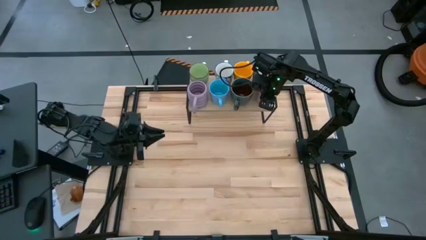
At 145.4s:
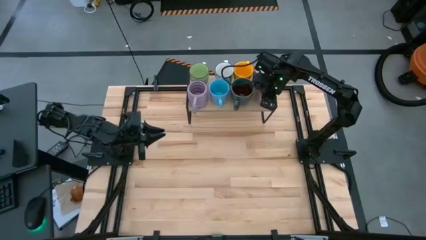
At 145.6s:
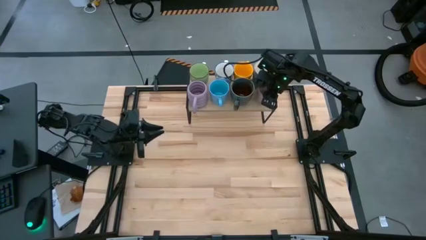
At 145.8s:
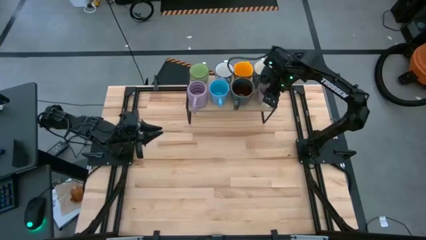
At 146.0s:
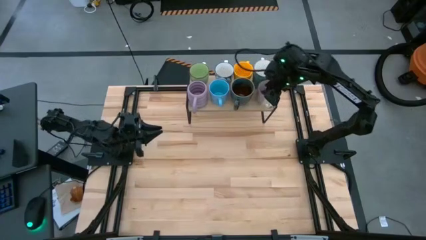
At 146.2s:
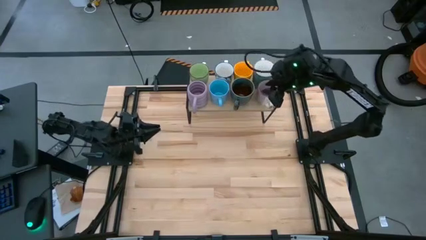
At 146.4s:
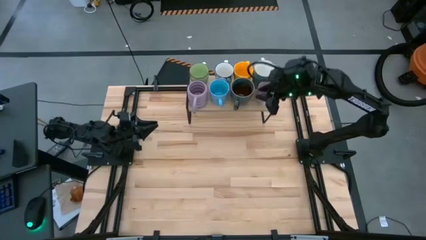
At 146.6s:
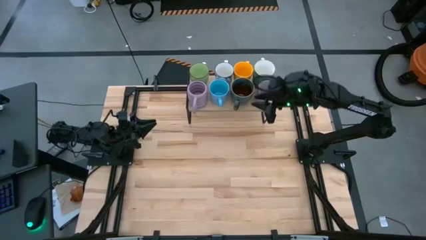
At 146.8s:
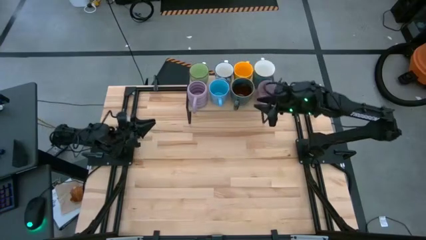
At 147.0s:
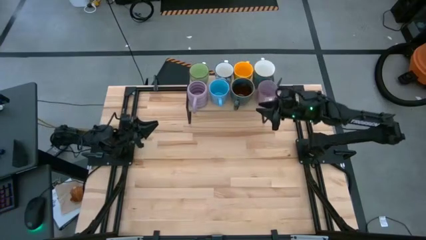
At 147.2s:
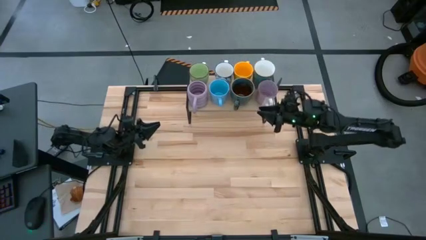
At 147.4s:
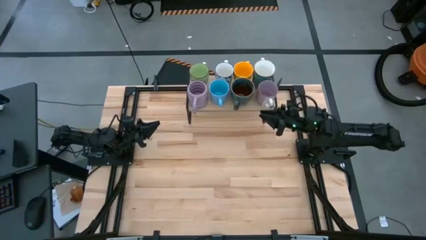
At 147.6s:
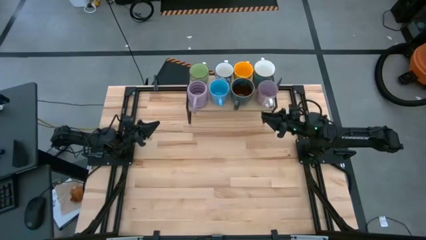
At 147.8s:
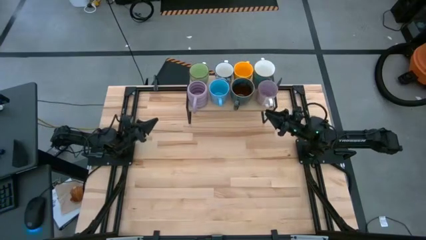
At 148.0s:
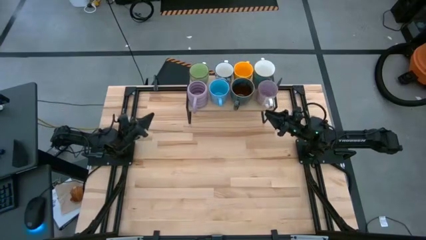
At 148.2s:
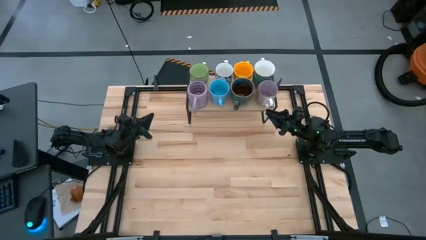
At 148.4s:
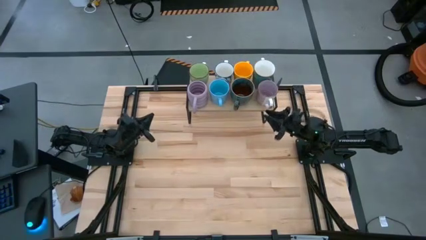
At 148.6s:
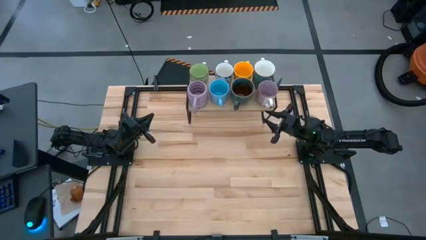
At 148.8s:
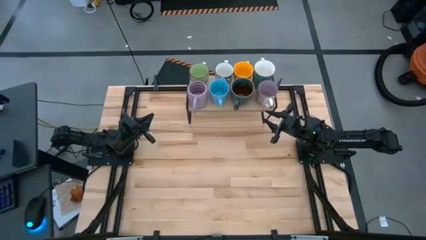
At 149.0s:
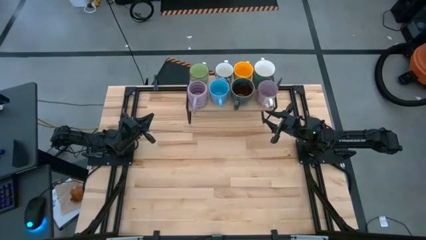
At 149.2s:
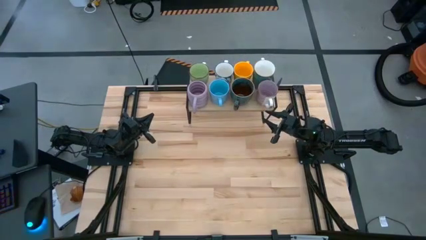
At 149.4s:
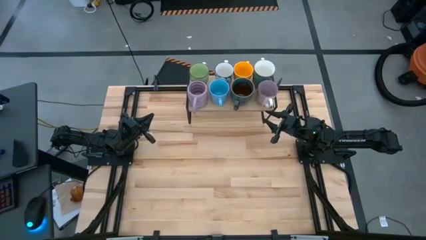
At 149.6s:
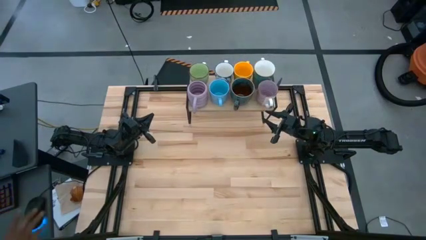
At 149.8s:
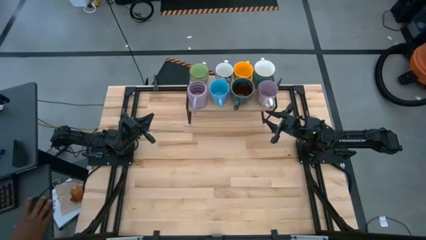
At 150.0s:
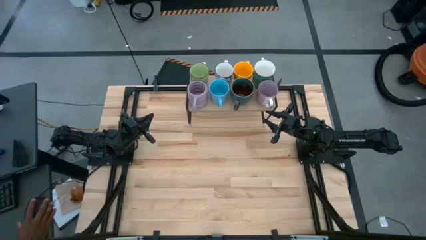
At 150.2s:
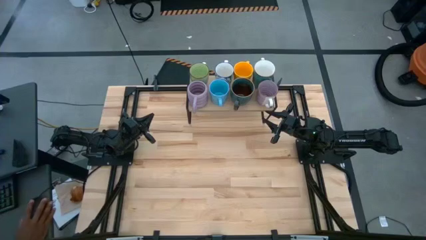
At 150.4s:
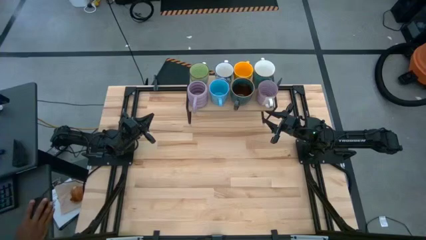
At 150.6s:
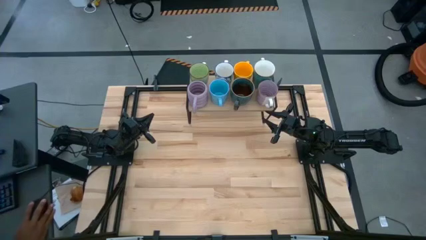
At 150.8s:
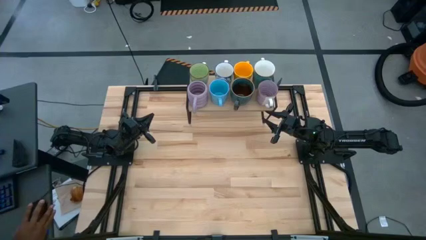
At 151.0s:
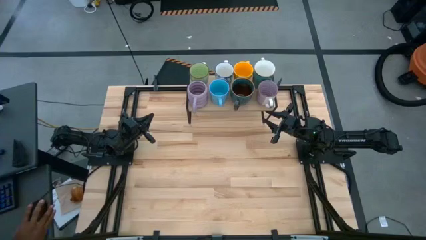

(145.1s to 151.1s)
Task: Place coffee mugs
Return to Home Position

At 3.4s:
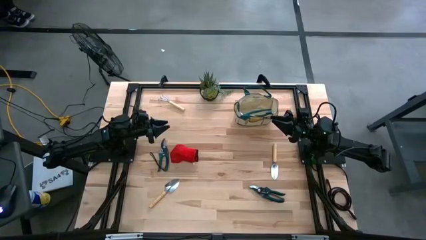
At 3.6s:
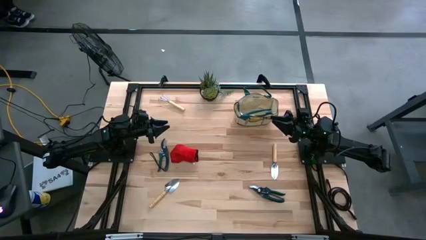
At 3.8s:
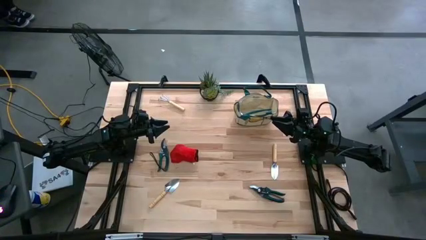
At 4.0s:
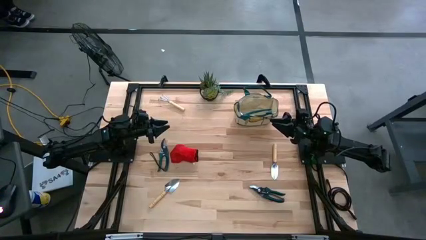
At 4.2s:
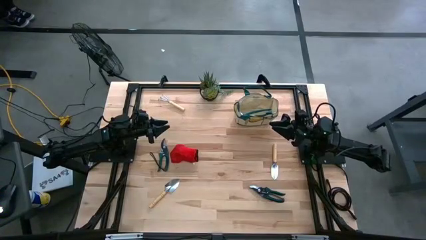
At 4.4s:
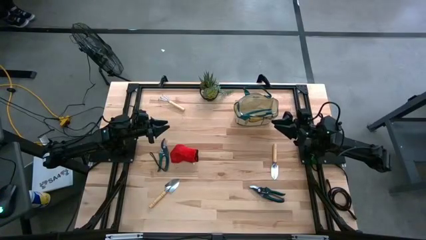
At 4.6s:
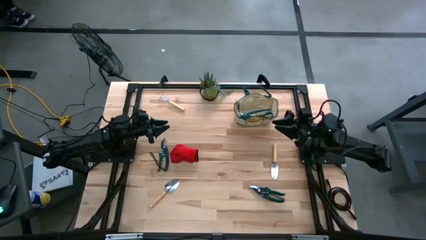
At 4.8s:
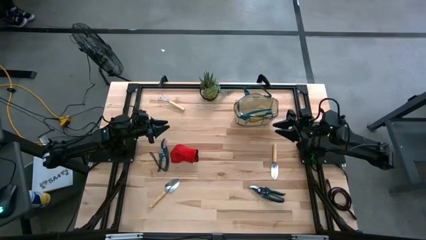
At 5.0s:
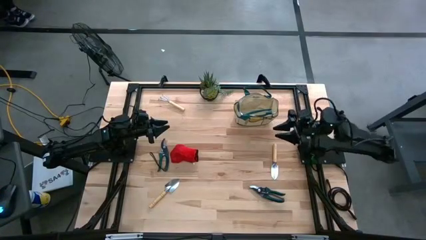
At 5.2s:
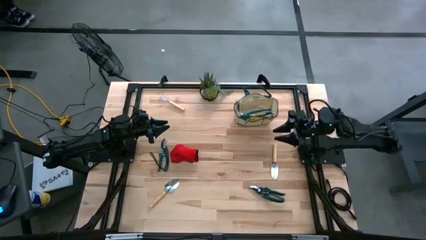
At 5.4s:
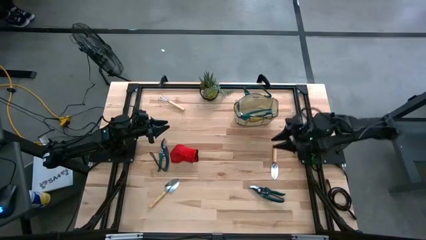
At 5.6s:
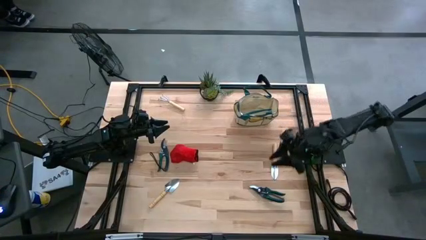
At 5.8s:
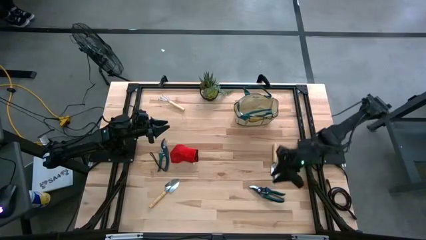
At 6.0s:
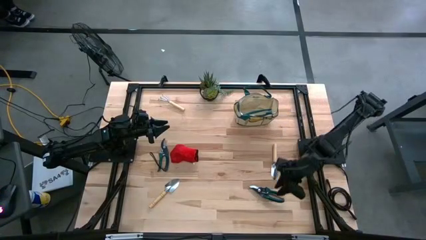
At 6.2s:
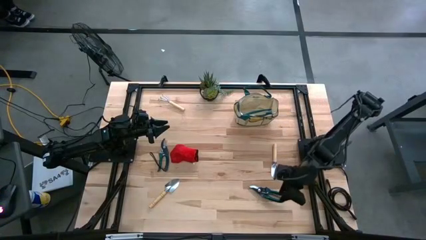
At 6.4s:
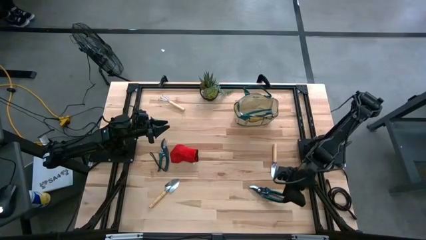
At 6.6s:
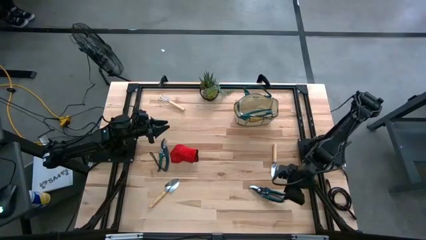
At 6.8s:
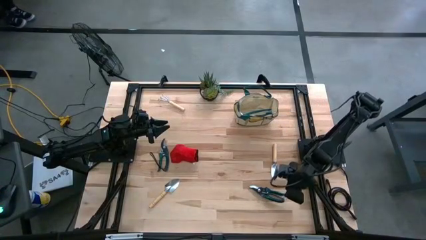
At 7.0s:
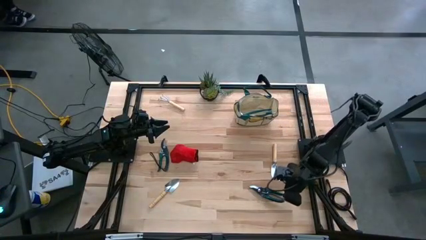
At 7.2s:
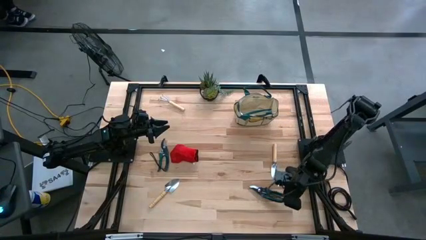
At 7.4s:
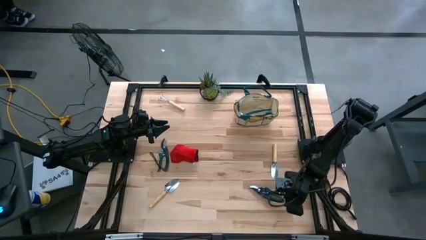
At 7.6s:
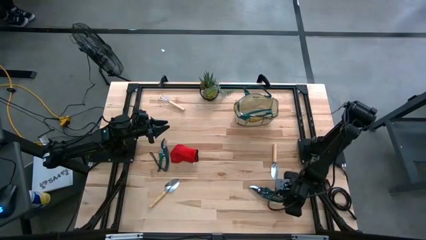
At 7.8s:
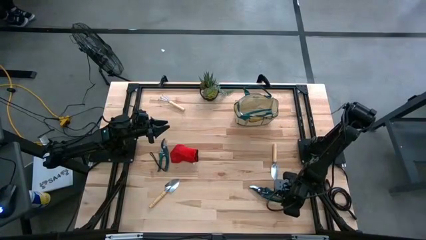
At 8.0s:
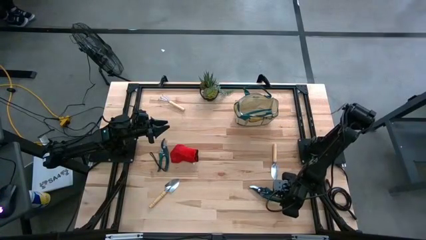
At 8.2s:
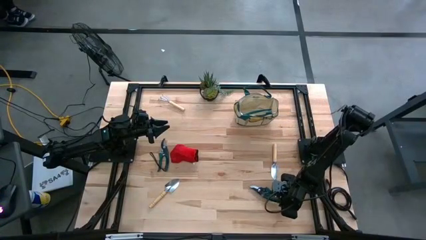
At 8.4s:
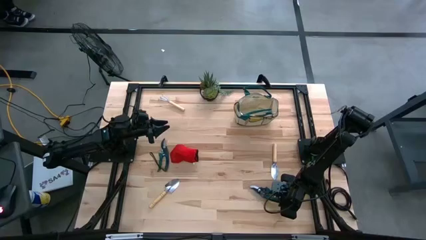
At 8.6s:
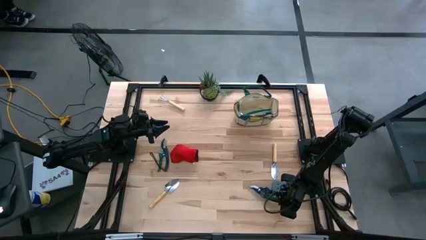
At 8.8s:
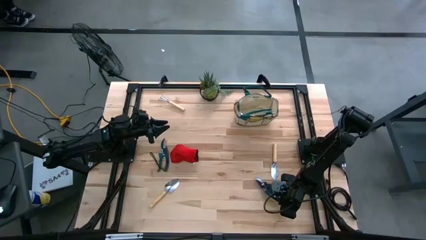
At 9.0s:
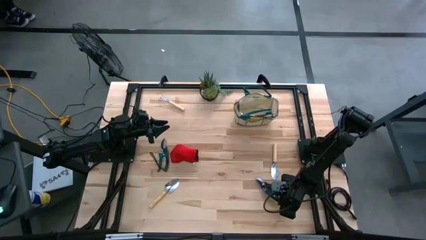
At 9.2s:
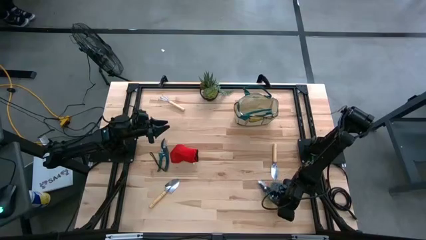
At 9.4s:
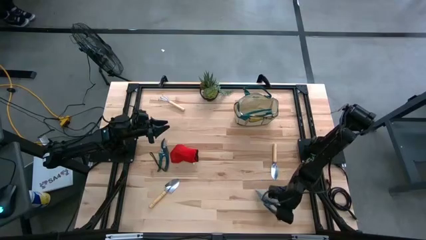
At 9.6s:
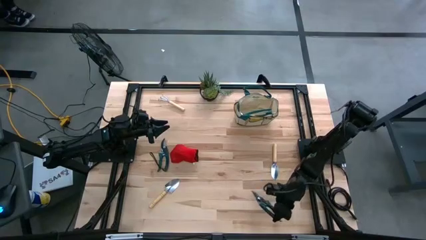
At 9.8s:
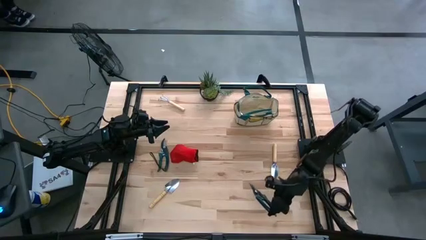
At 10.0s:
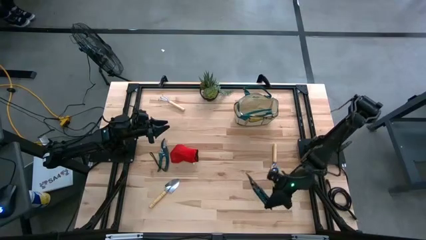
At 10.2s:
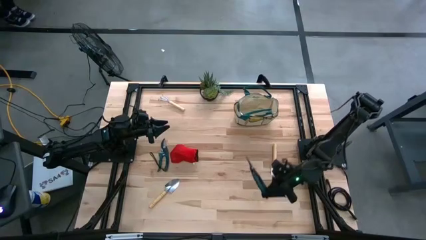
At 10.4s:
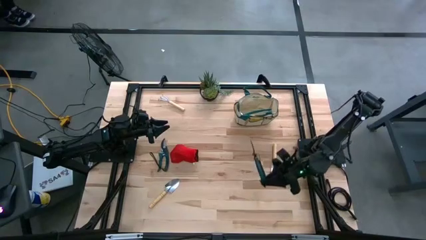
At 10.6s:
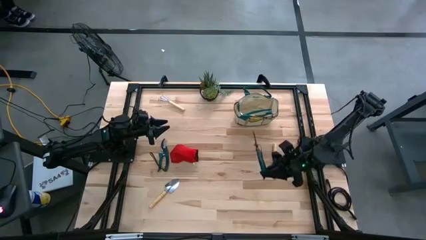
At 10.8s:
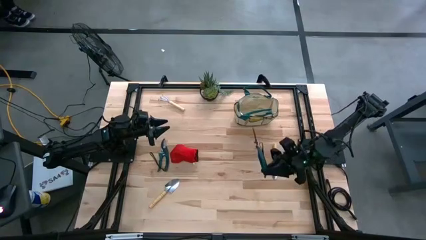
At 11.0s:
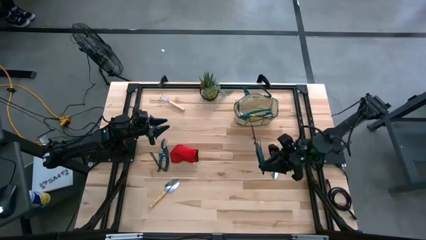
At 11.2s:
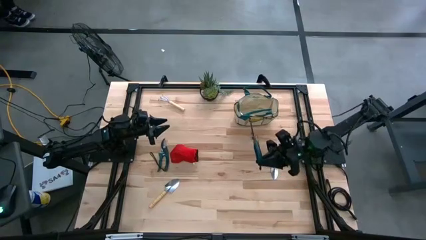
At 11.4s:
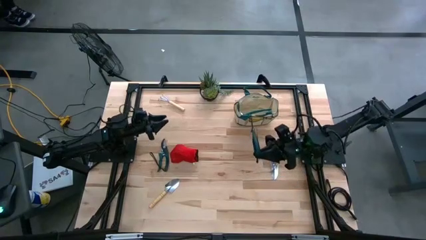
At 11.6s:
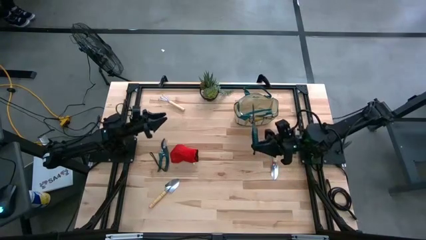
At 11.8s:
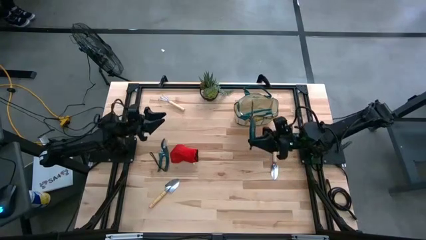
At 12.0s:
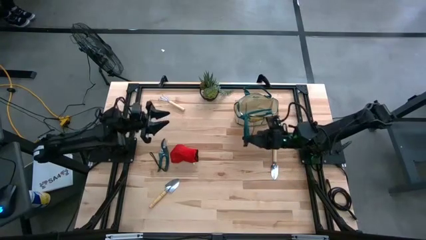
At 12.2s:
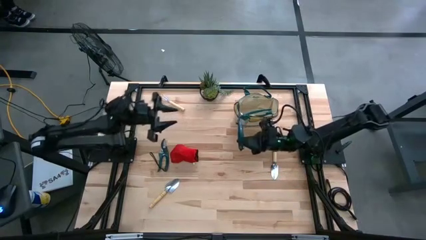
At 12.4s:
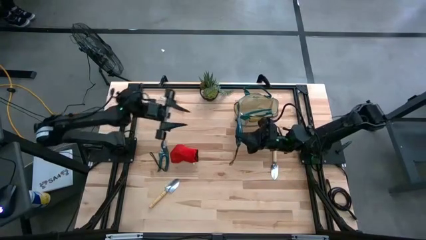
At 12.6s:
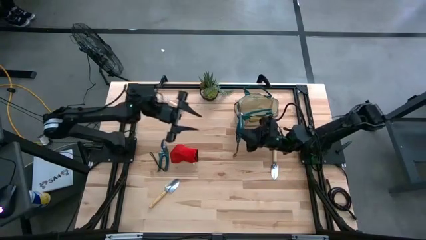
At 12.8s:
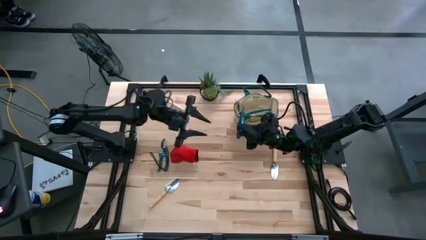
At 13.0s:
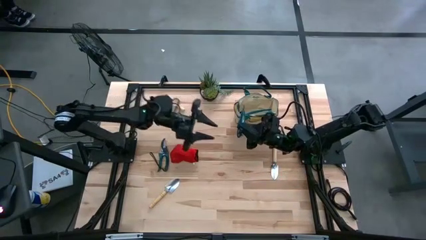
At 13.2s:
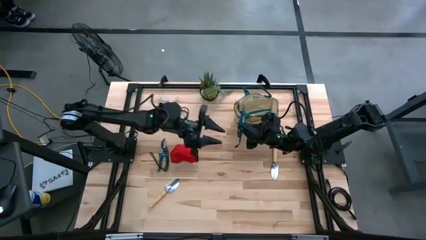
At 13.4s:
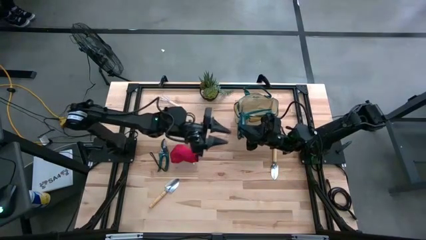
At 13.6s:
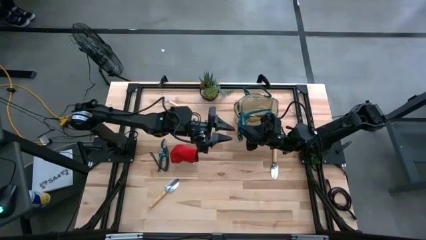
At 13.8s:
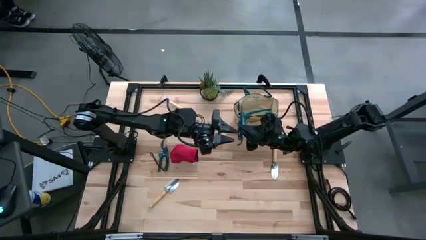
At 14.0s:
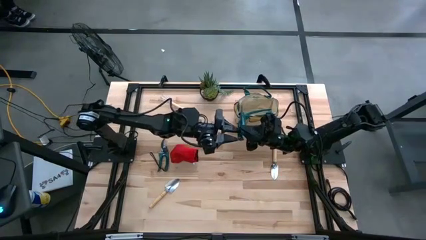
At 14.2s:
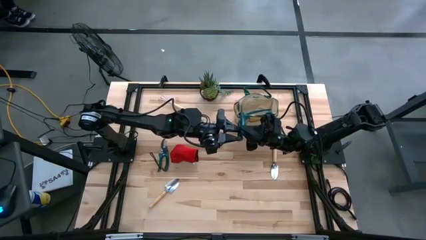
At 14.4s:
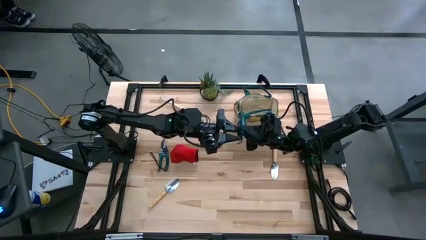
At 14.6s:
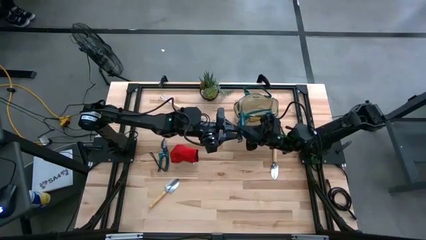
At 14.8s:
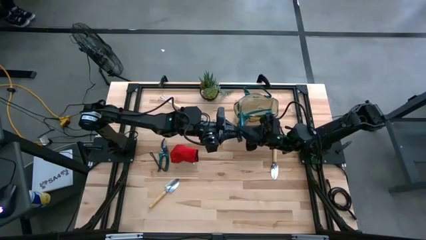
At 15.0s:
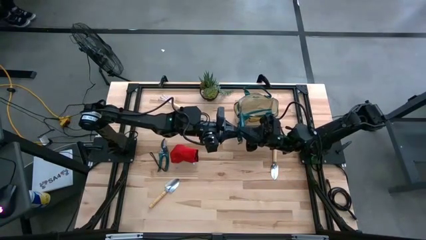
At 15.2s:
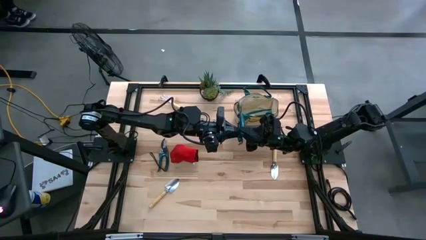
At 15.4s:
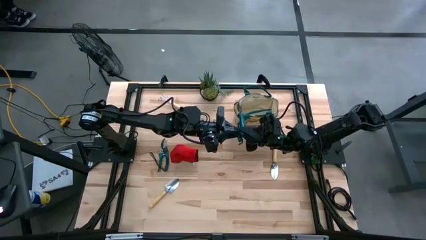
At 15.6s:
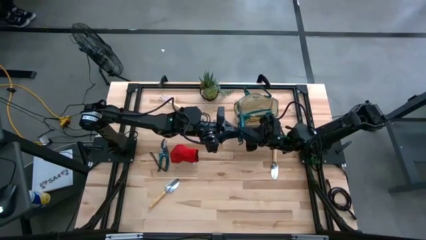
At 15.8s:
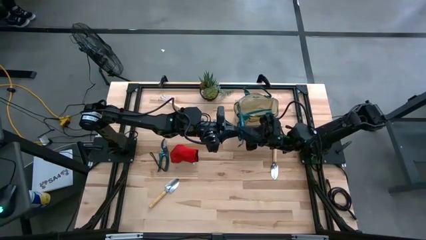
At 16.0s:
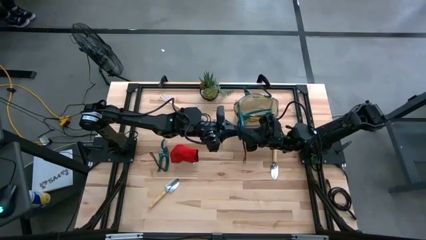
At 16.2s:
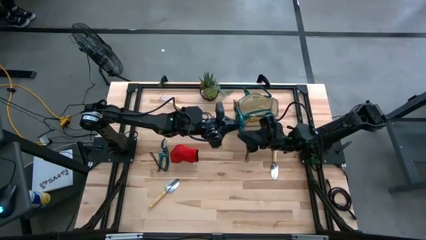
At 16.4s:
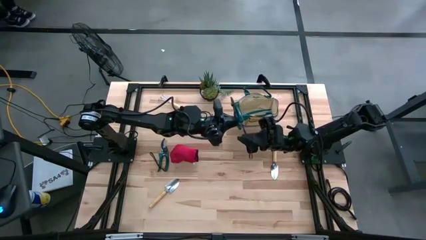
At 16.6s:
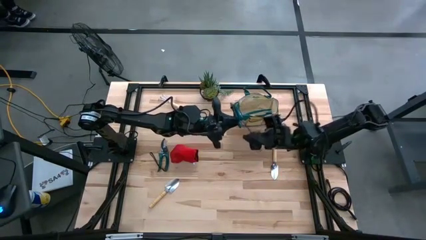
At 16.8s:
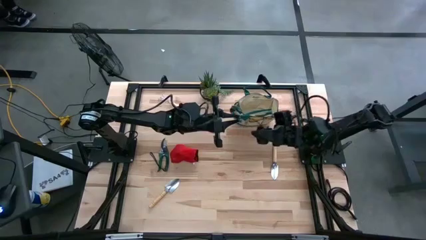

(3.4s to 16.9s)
Task: Pick & Place Garden tools in Gardening bag
Put the right green shear scissors into the light brown gardening bag
